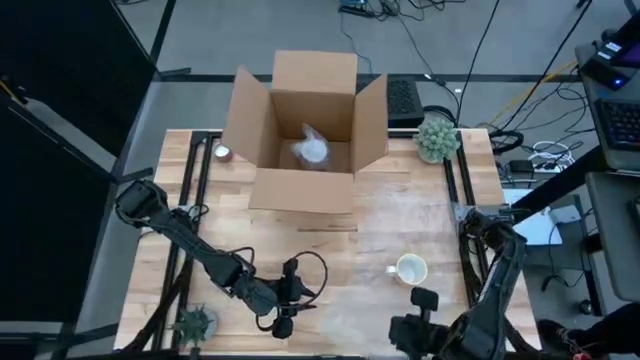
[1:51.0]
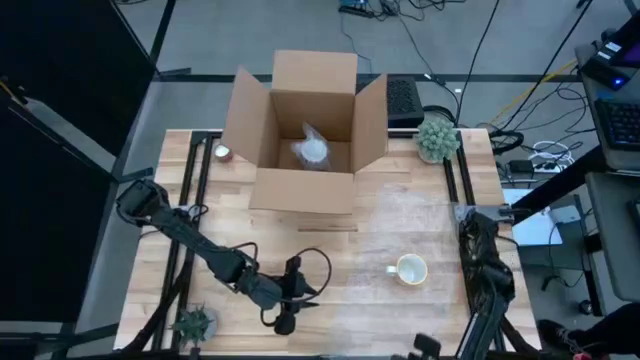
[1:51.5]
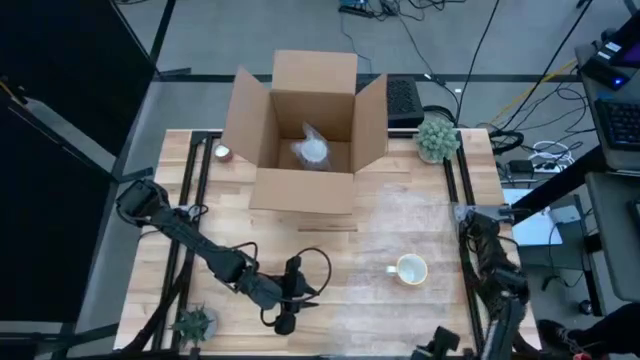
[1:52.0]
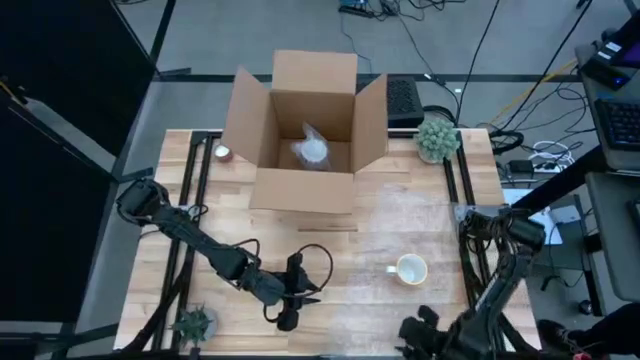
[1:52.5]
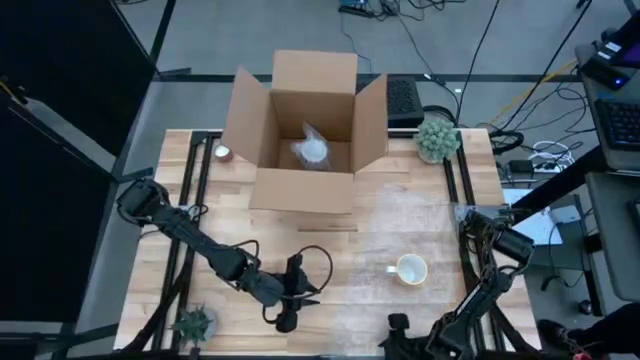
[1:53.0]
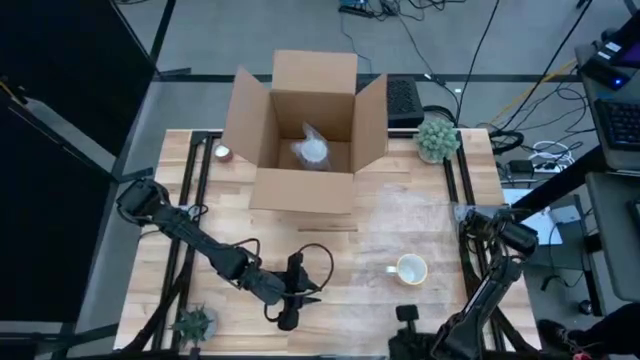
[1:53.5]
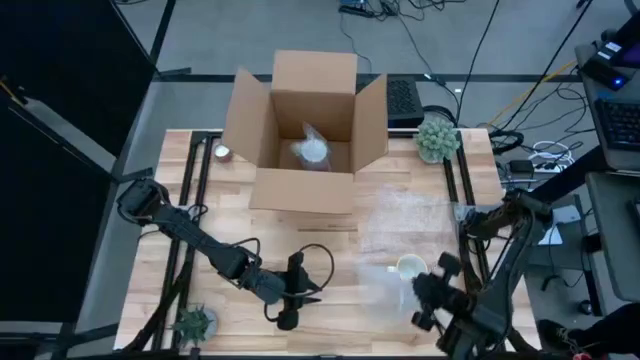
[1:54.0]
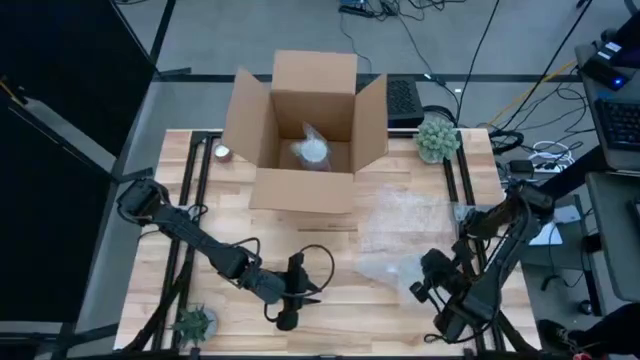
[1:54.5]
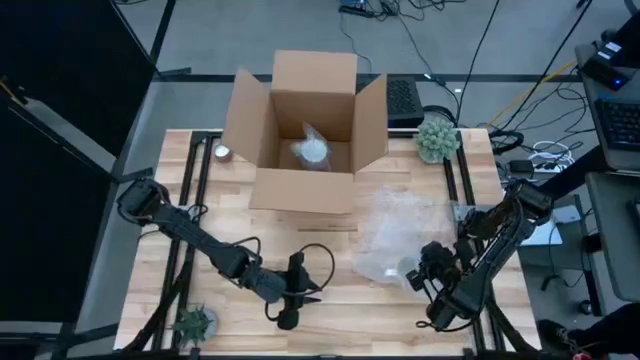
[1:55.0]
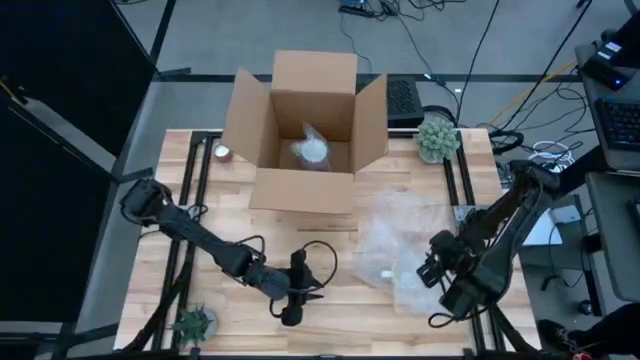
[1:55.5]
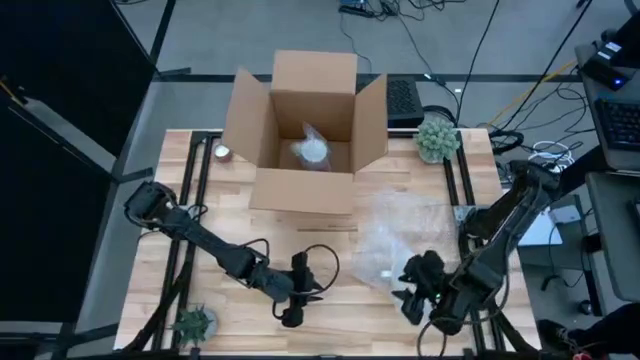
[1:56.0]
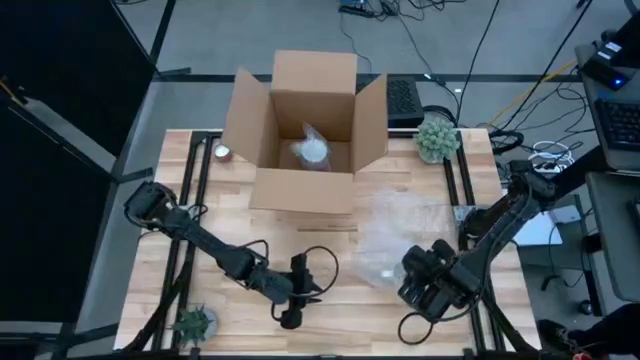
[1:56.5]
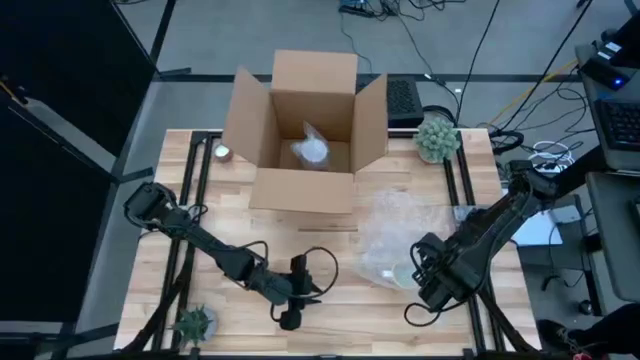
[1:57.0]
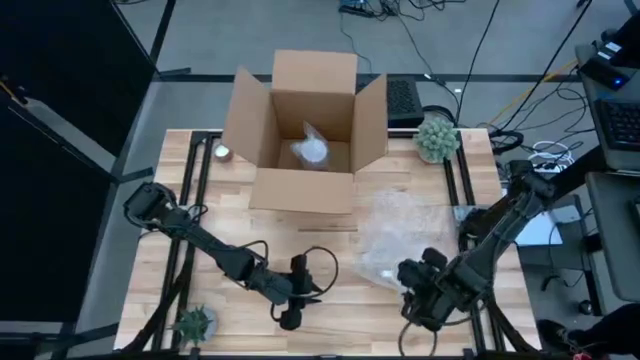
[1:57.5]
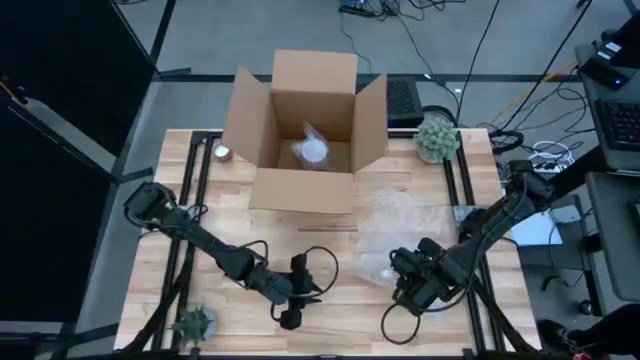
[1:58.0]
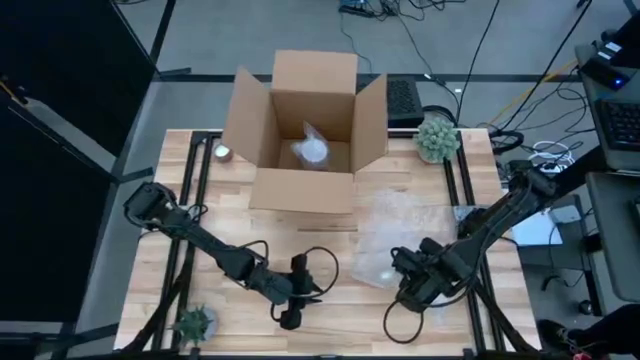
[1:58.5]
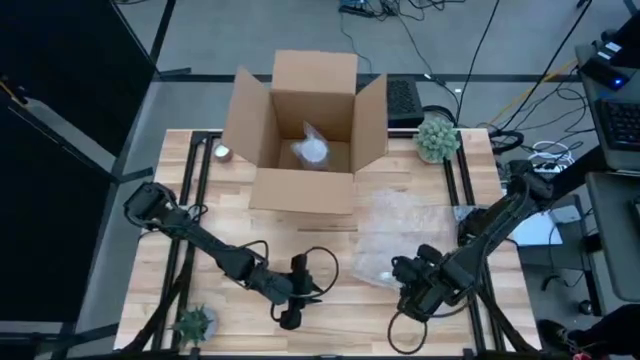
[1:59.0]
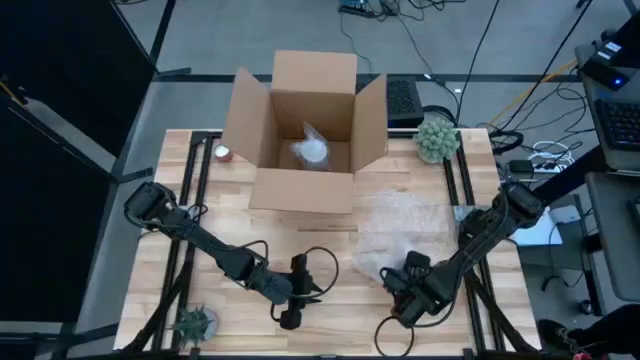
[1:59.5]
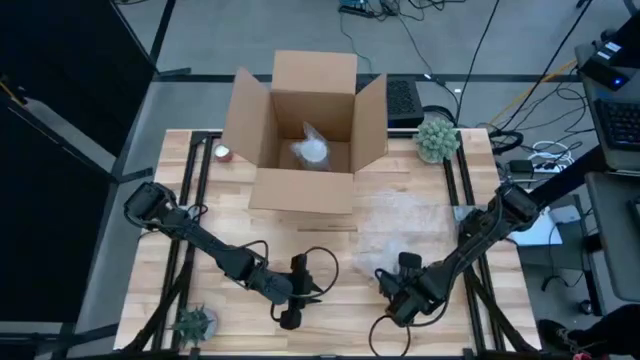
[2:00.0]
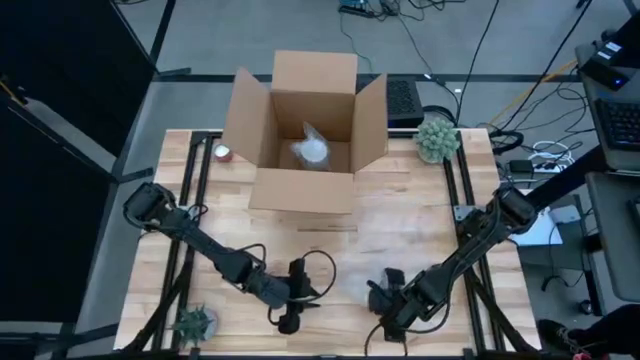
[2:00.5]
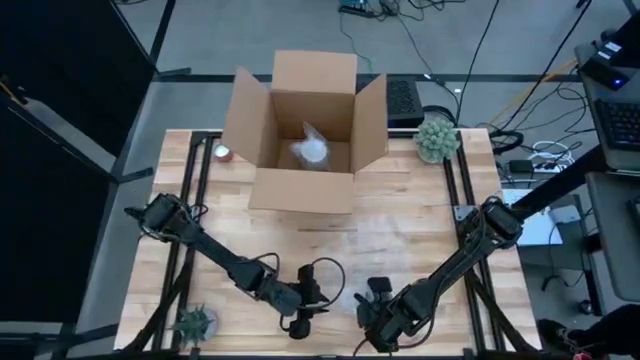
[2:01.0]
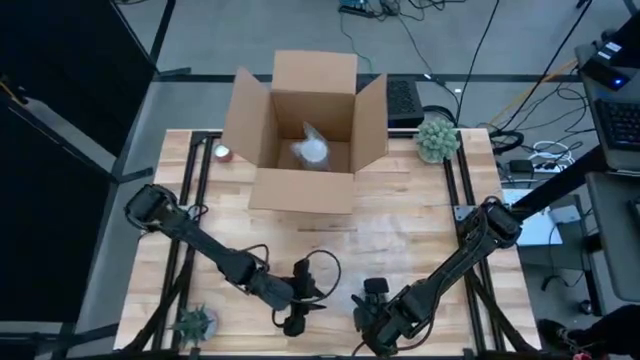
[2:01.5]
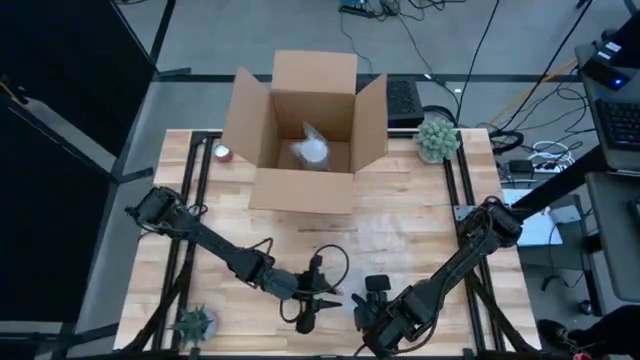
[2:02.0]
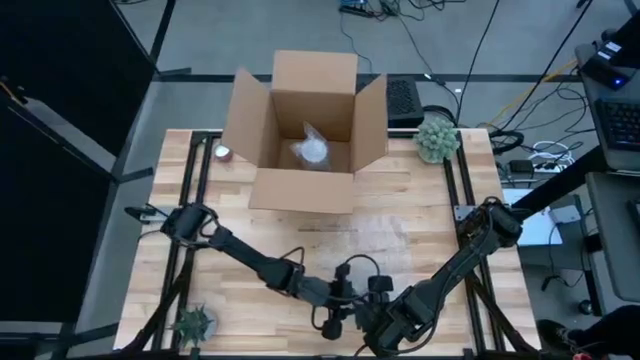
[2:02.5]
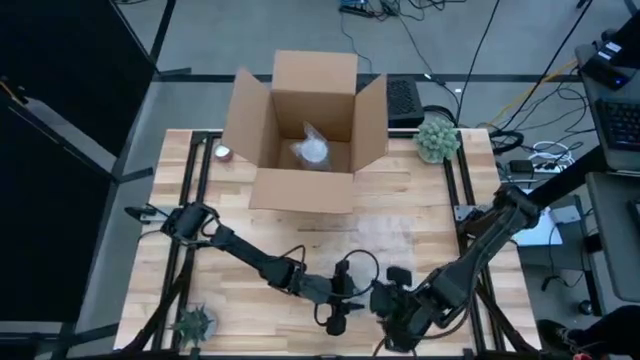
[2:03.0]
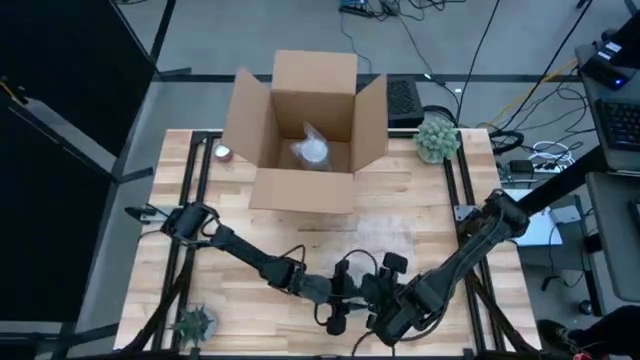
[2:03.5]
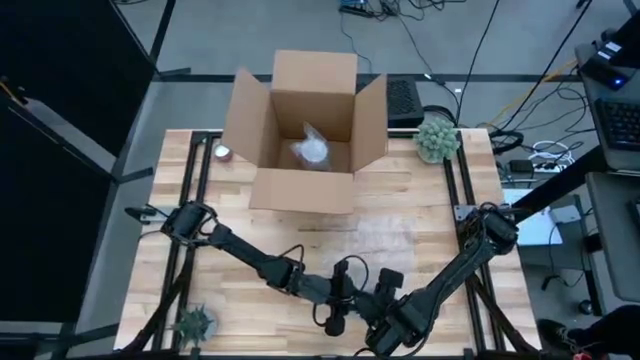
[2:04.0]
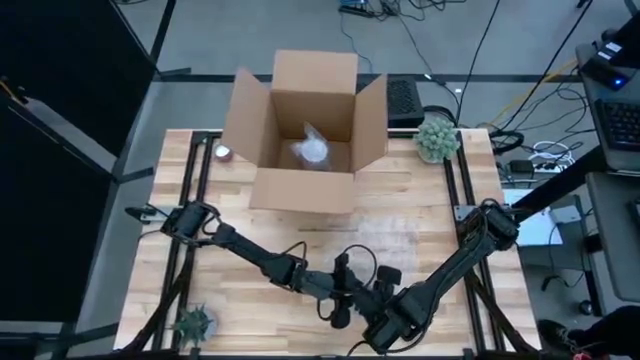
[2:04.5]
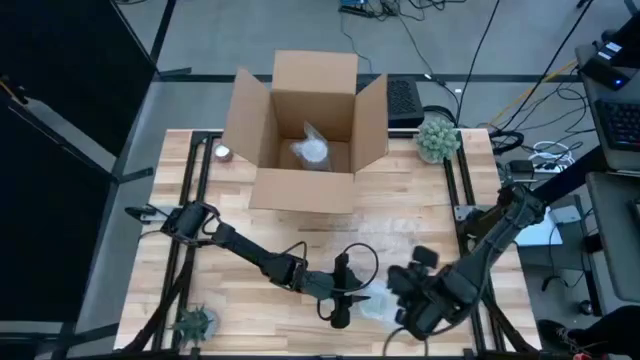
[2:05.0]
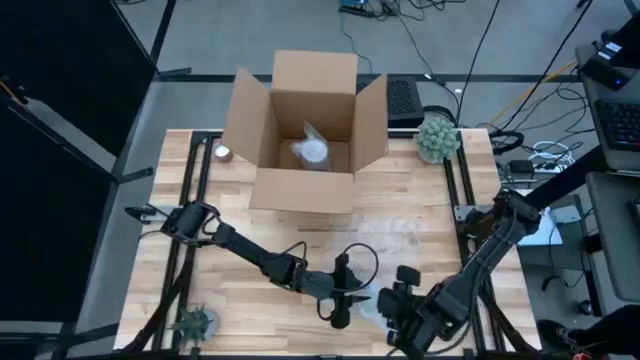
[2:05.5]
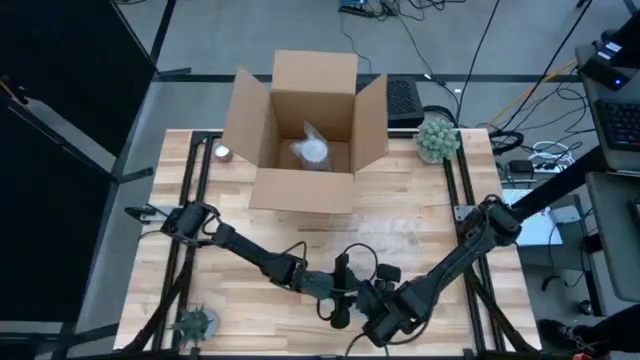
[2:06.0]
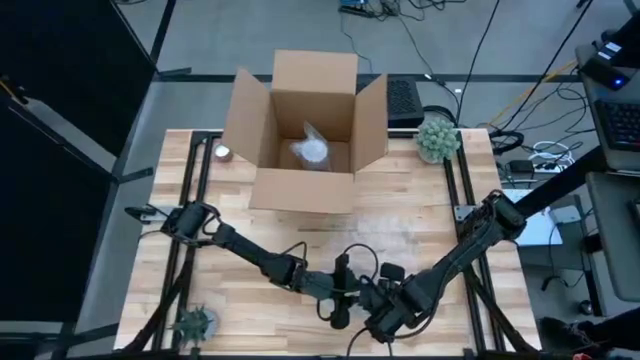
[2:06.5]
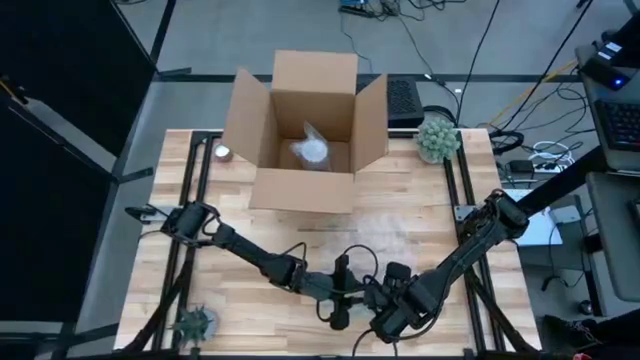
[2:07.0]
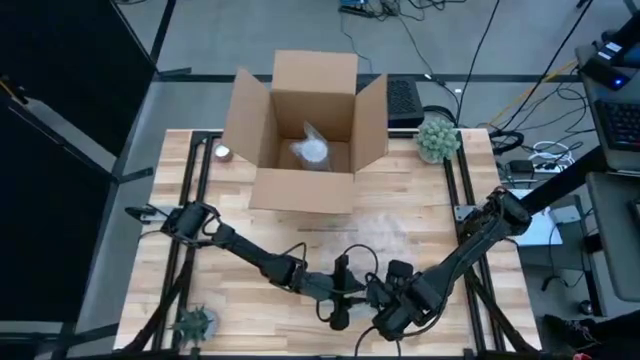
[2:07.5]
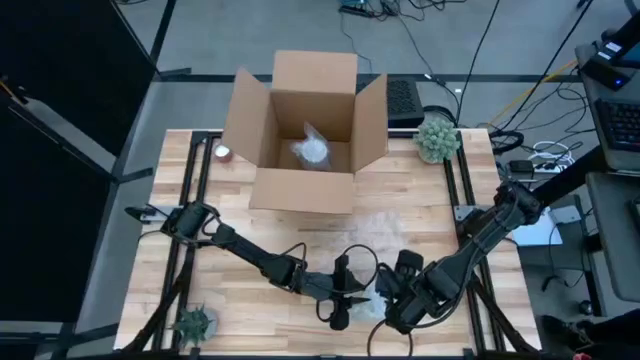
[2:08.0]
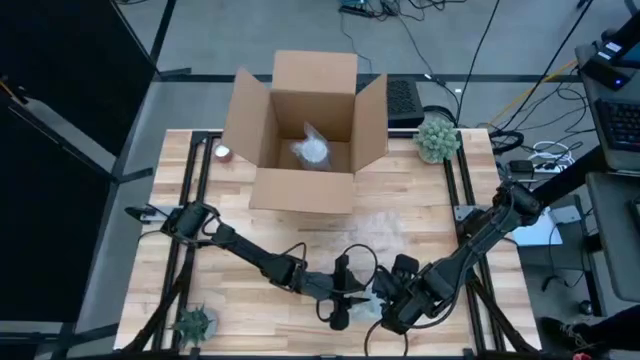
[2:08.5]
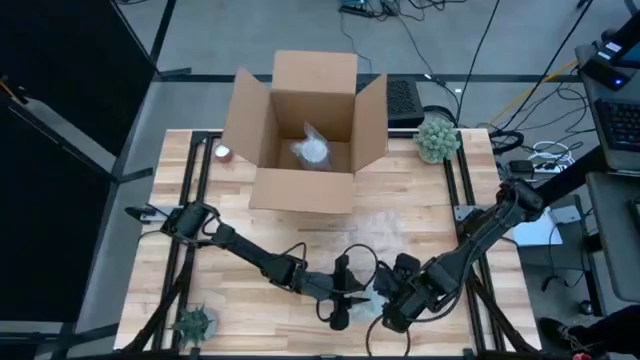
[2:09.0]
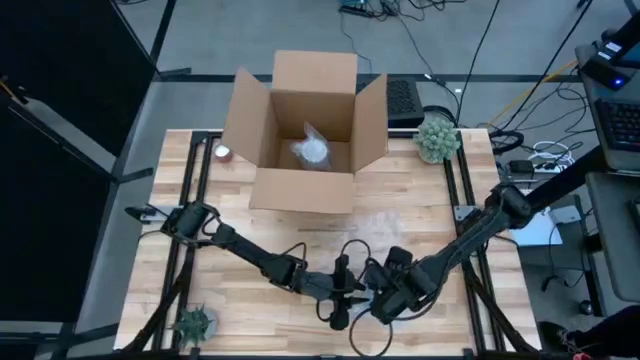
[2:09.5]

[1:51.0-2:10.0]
Task: wrap mug
Wrap the orange cup with the transparent bubble wrap

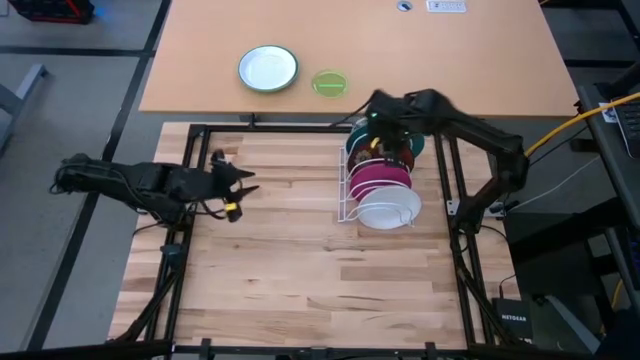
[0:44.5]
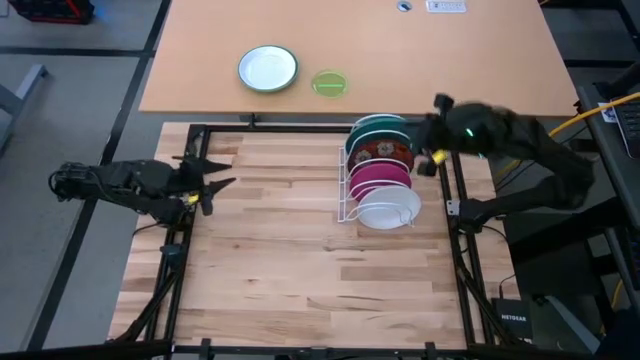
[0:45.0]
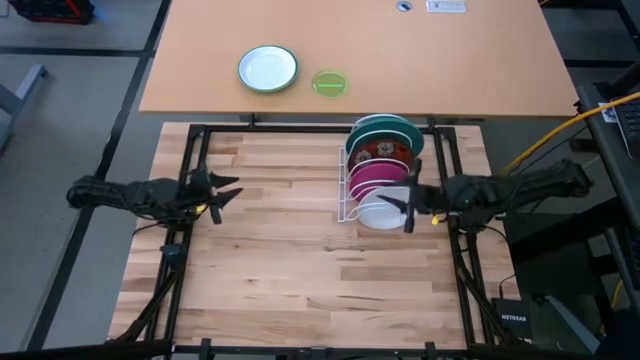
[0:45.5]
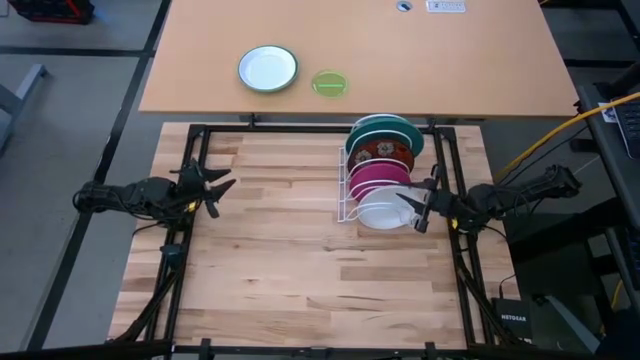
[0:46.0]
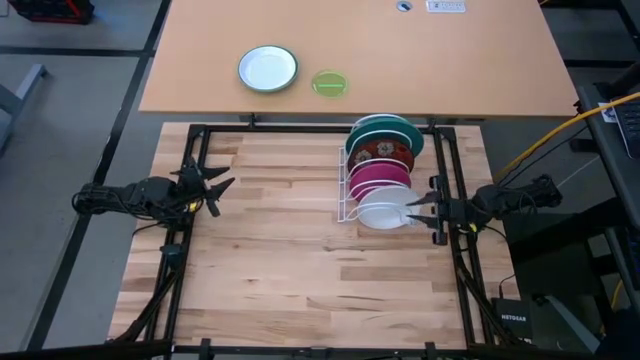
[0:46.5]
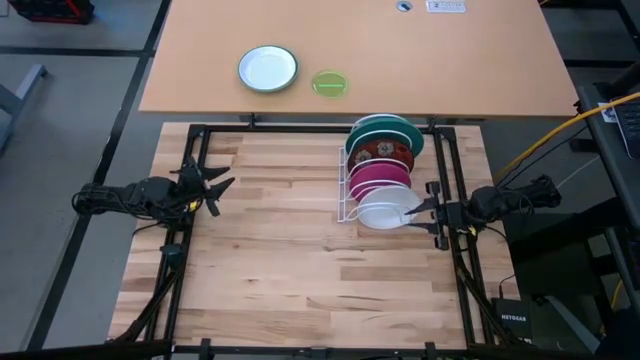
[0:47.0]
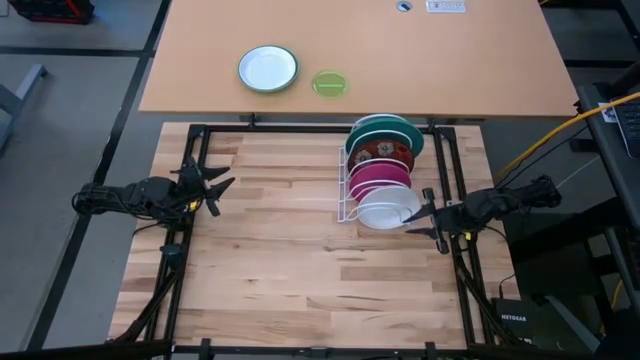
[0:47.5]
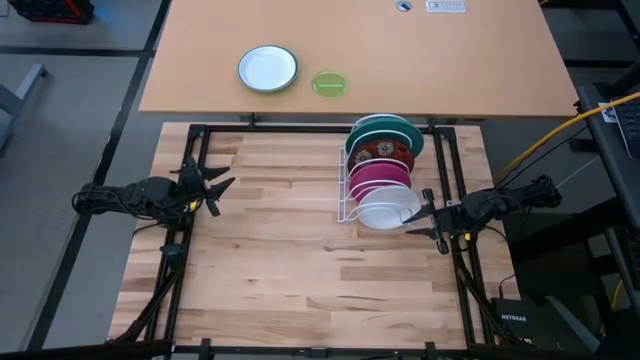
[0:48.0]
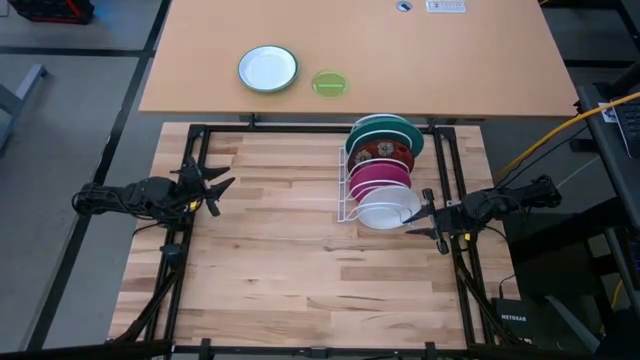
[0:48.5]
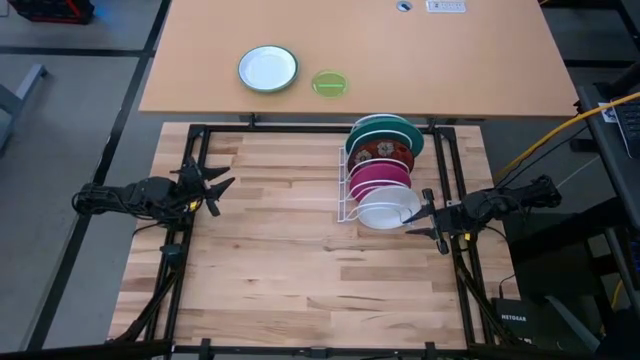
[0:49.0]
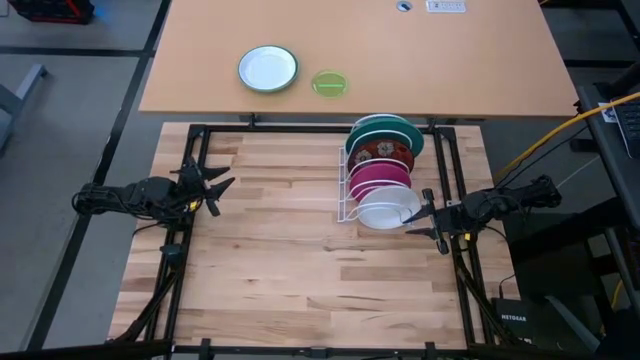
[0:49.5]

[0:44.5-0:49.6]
Task: Sort dishes
Return to Home Position
